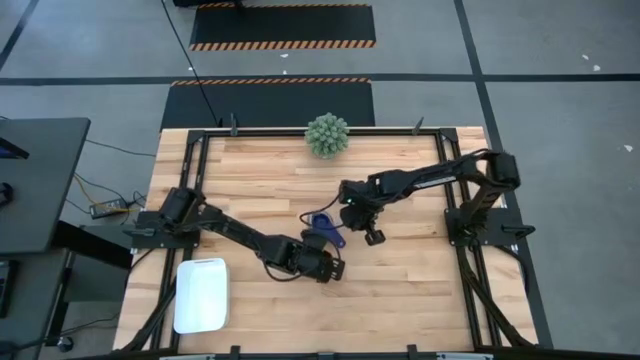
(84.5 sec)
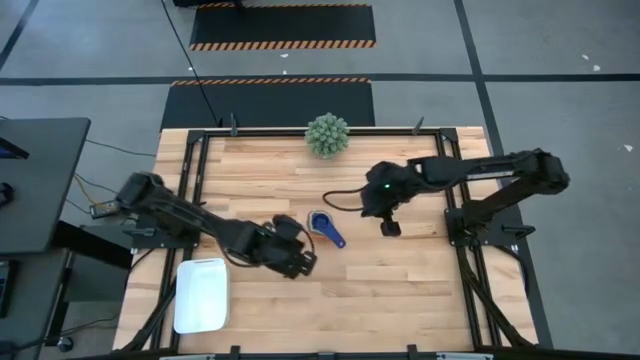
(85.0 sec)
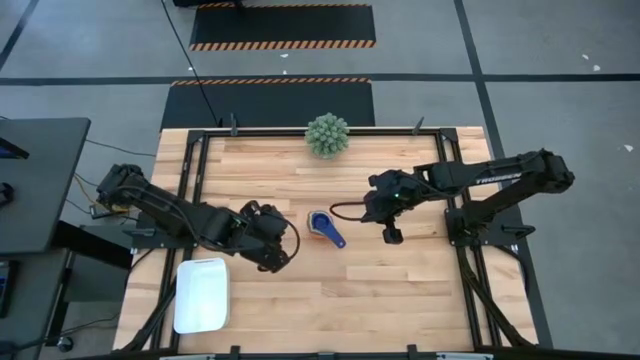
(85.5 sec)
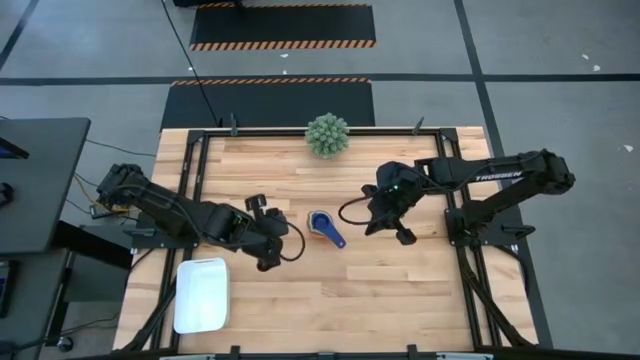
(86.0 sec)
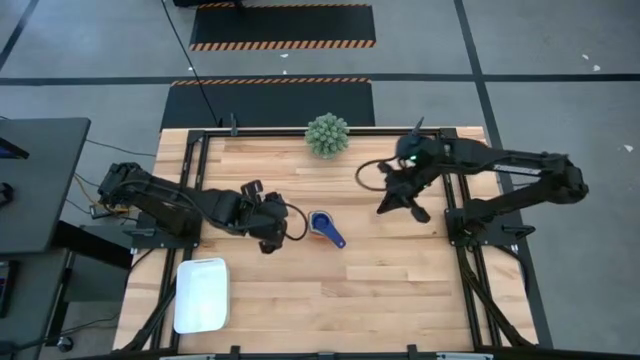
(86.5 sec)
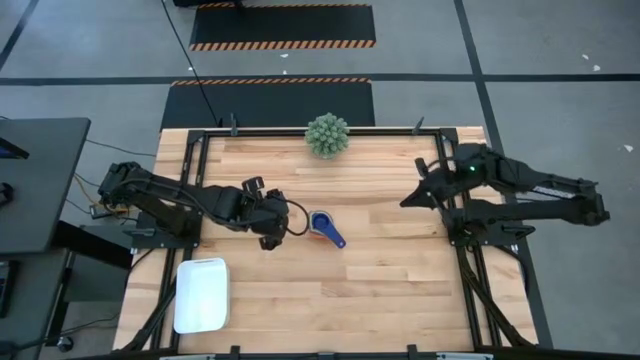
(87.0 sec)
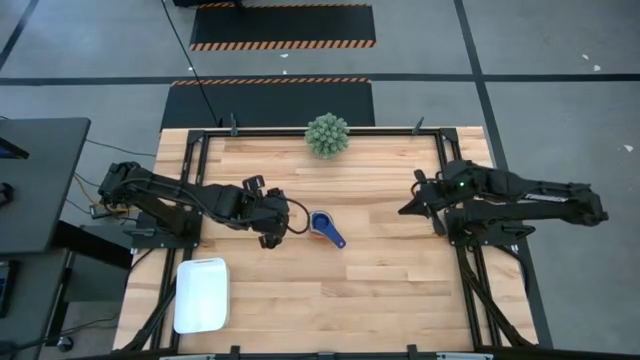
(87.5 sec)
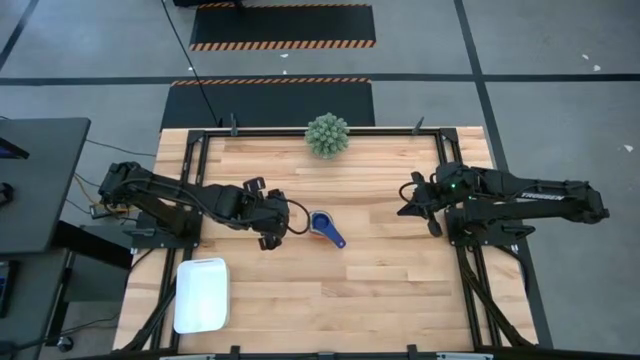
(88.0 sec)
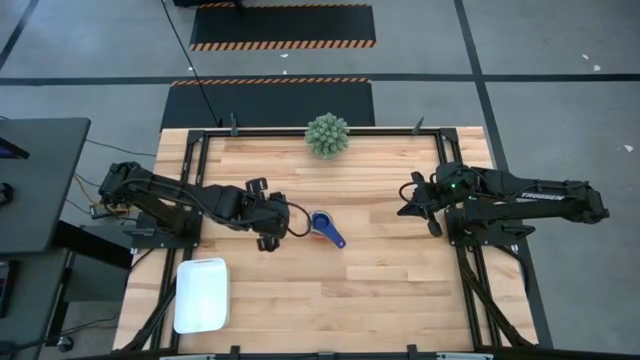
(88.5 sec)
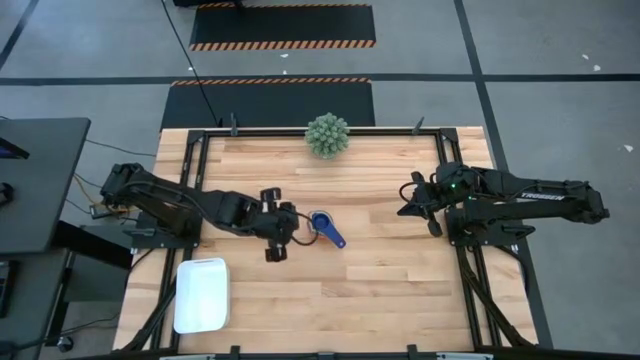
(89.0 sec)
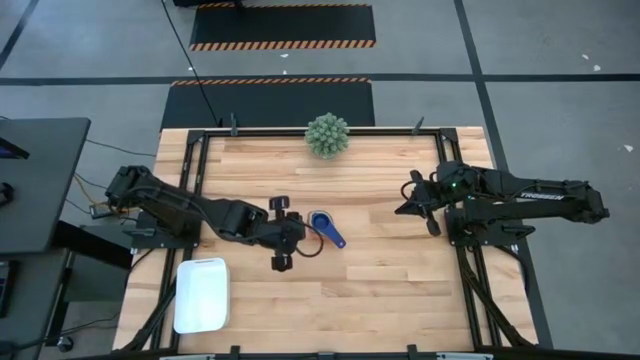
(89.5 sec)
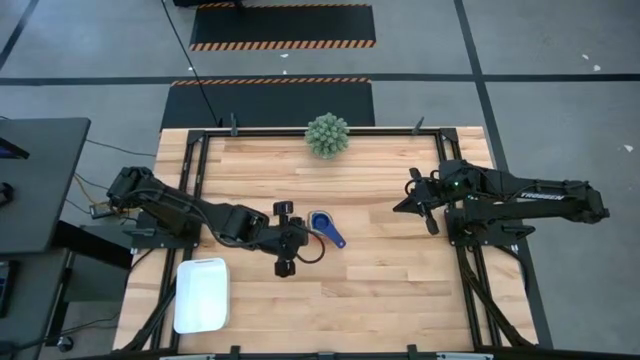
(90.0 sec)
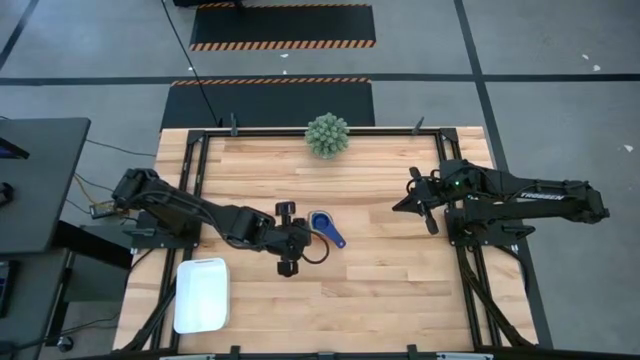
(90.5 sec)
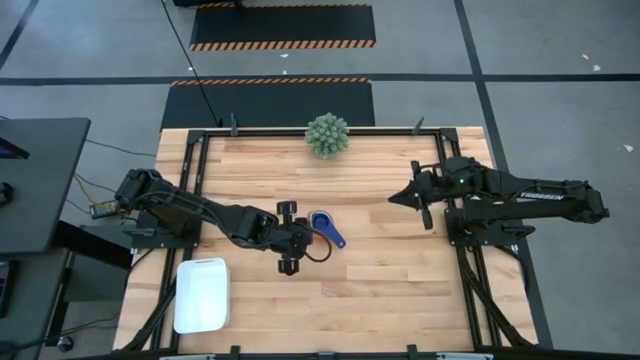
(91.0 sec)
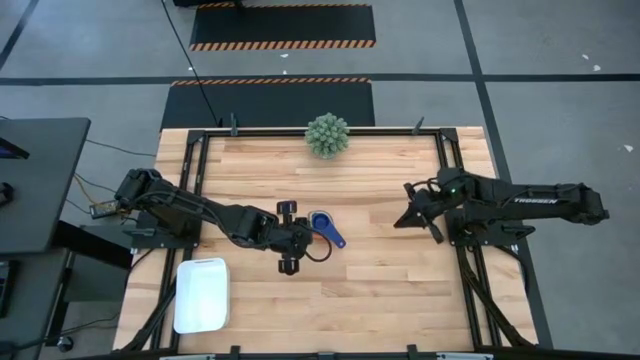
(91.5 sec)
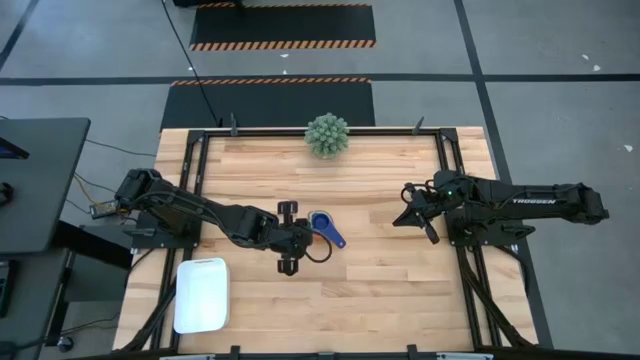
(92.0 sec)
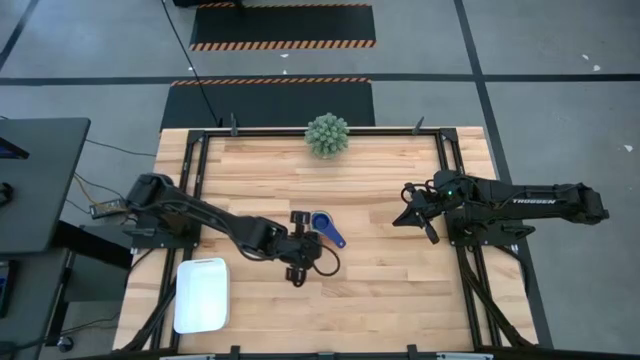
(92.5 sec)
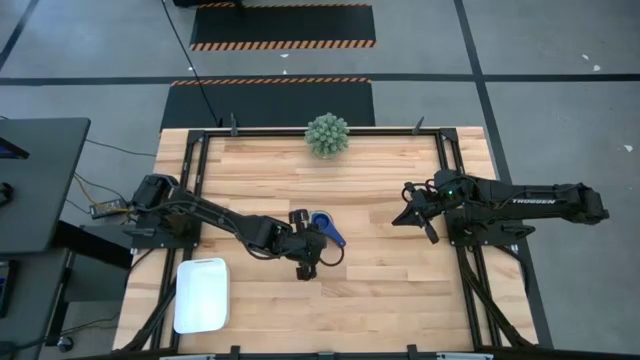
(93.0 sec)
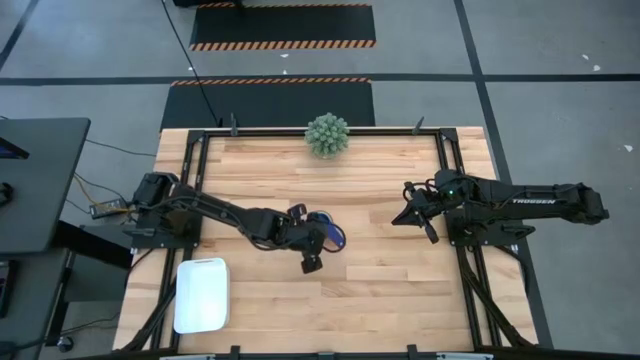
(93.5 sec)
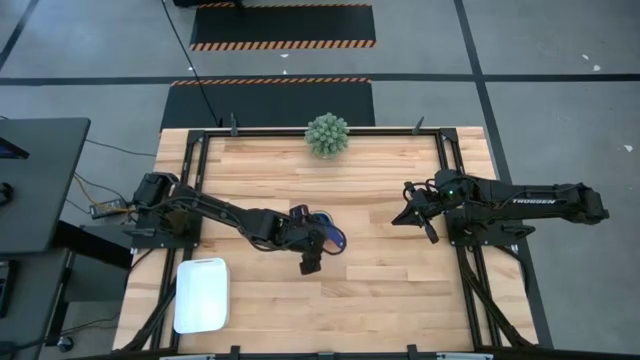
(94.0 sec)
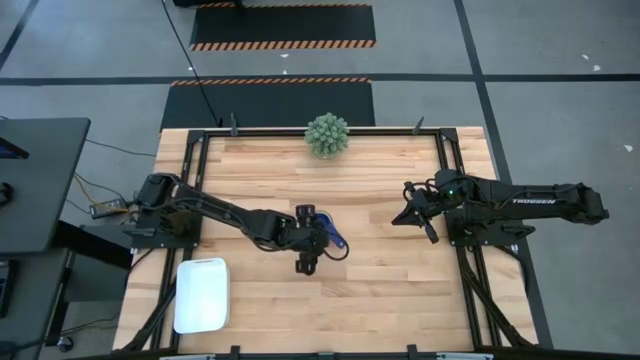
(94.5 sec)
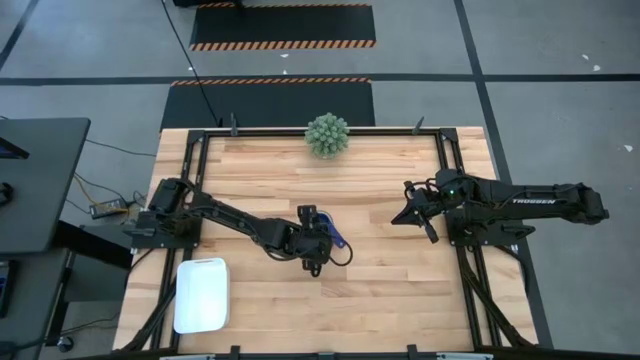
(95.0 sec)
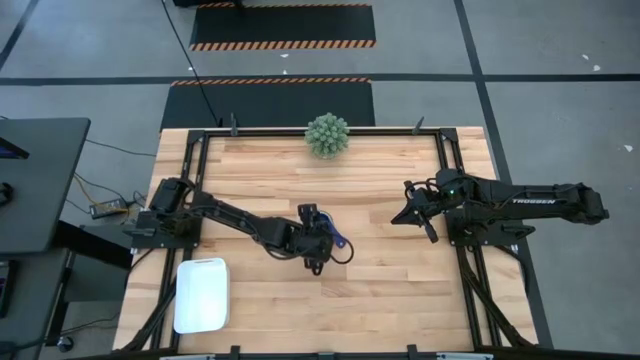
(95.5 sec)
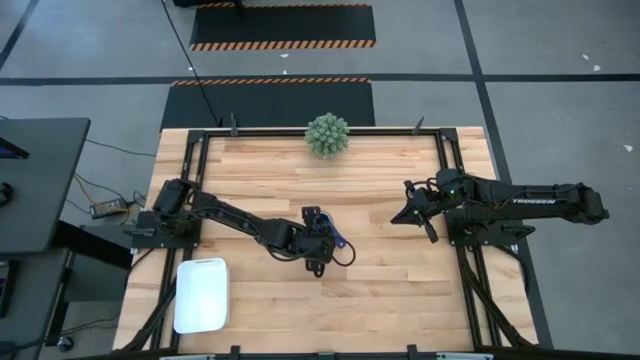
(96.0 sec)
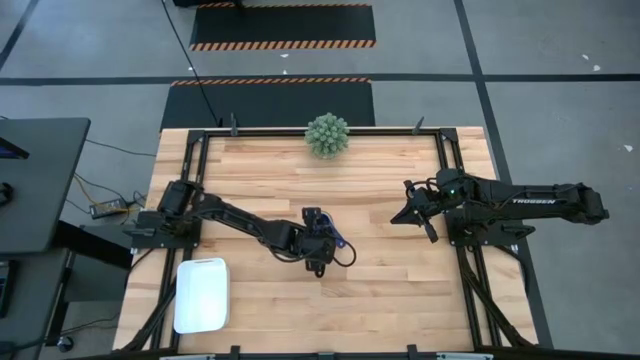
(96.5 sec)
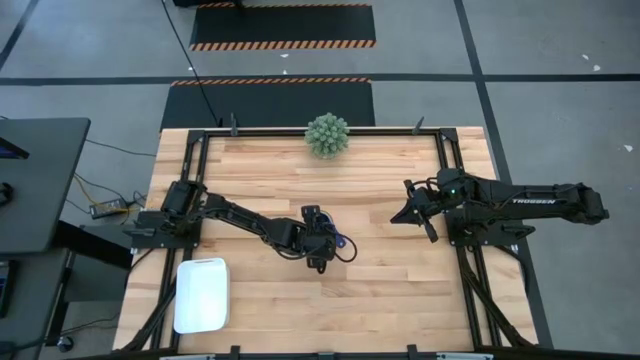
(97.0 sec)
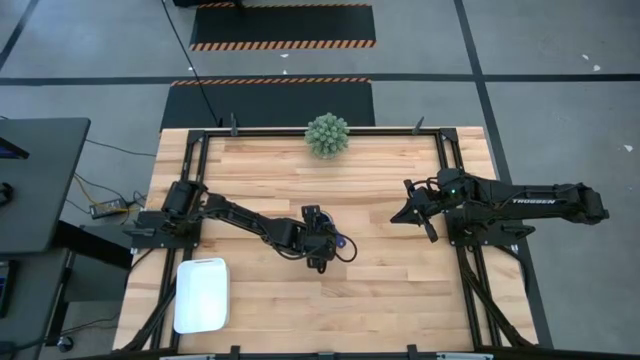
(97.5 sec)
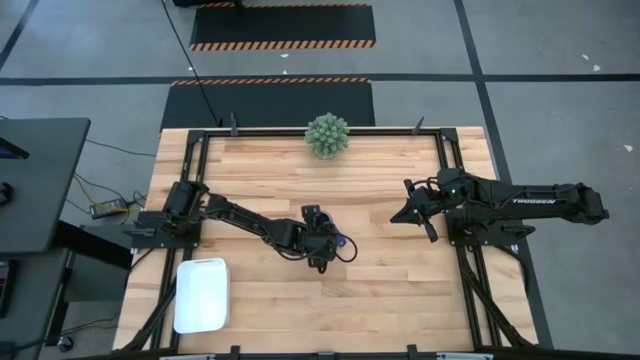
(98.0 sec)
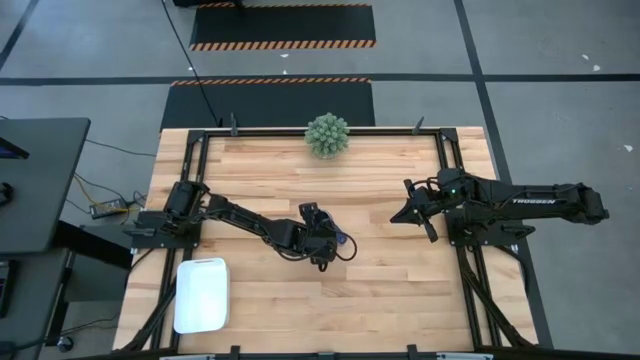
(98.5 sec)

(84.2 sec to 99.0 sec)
Task: Nest measuring cups in basket
Put the nested measuring cups into the white bin

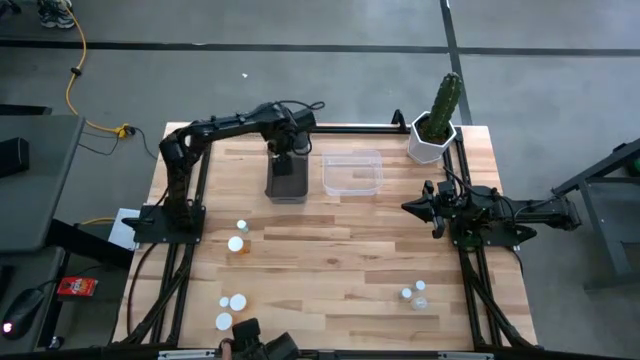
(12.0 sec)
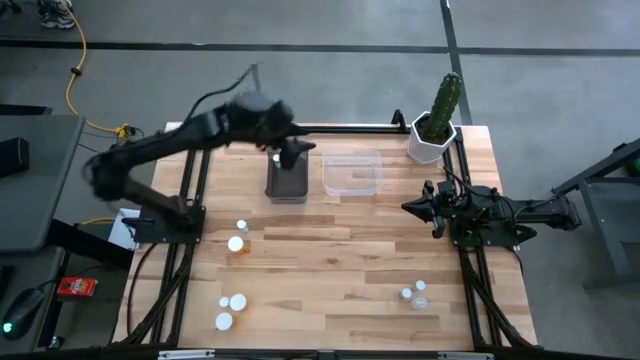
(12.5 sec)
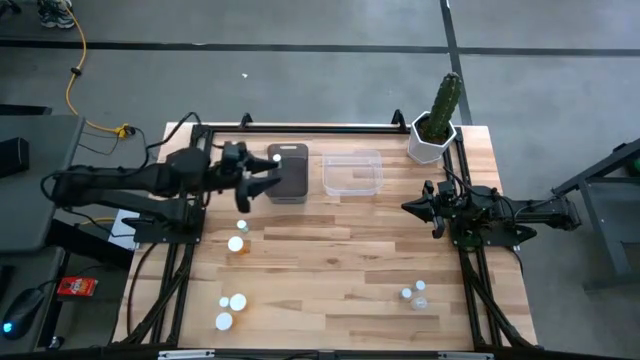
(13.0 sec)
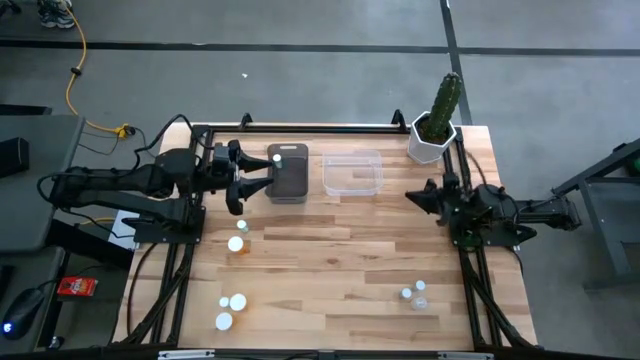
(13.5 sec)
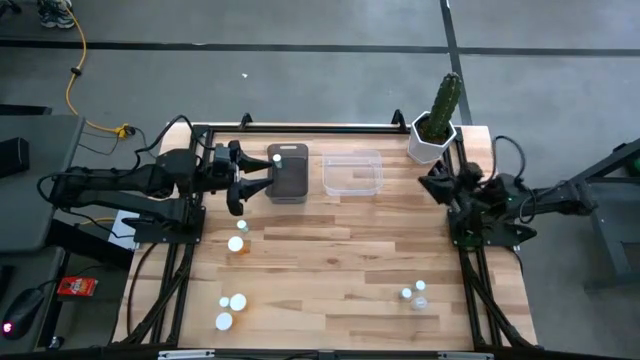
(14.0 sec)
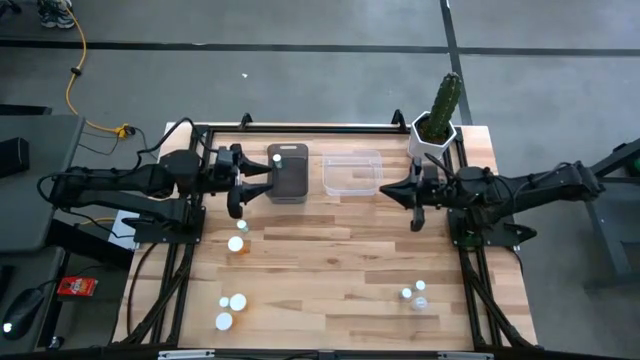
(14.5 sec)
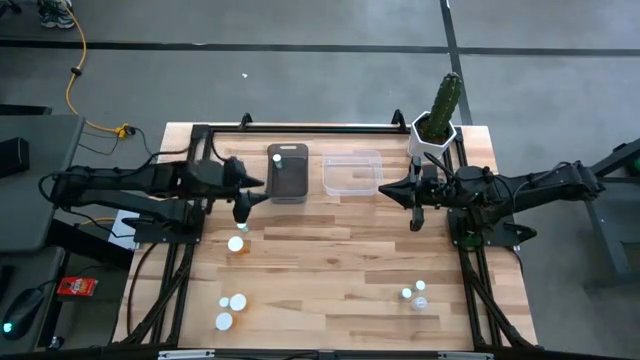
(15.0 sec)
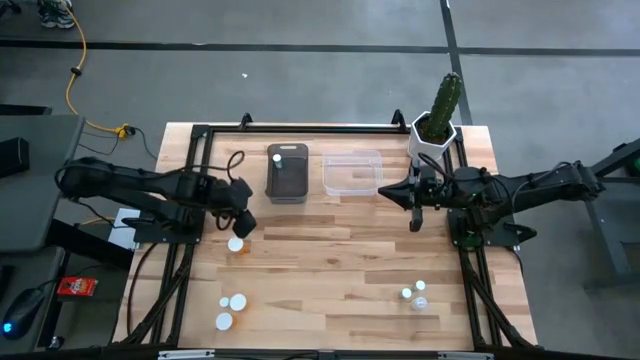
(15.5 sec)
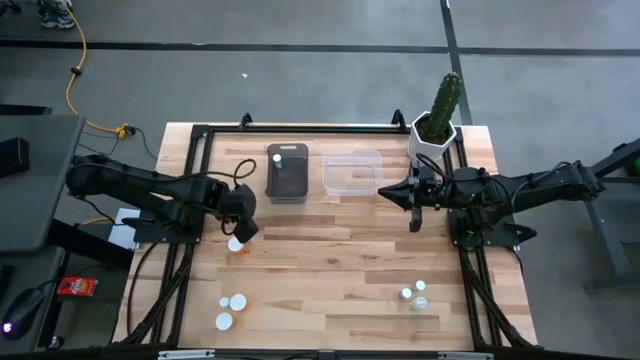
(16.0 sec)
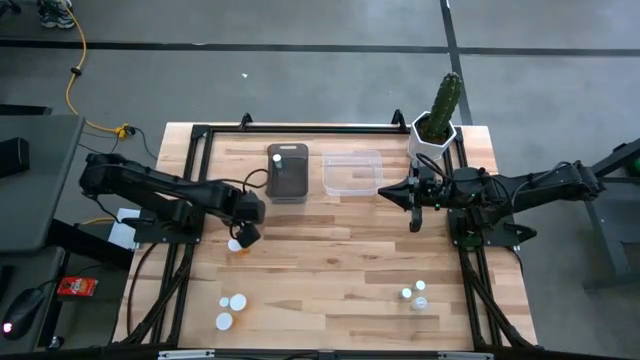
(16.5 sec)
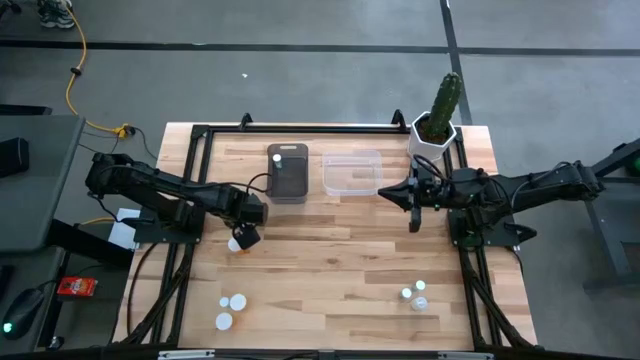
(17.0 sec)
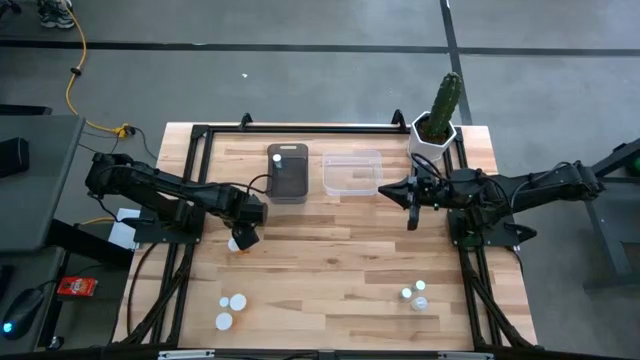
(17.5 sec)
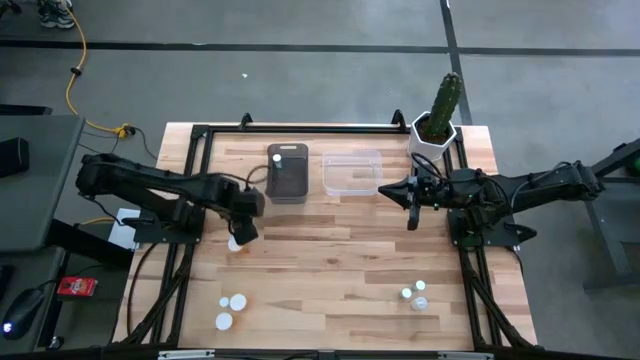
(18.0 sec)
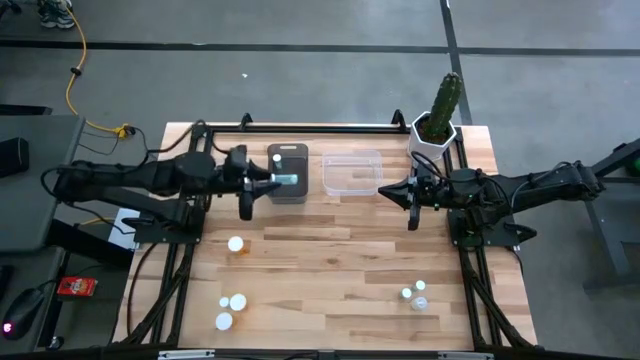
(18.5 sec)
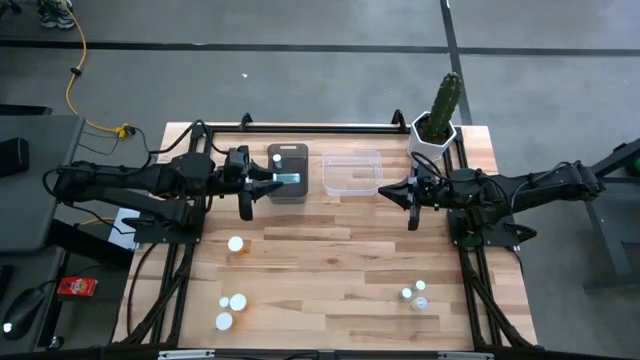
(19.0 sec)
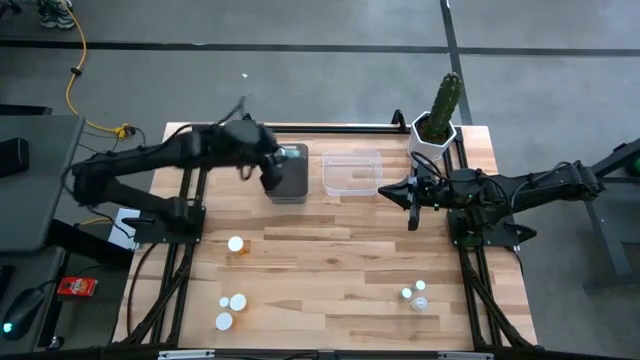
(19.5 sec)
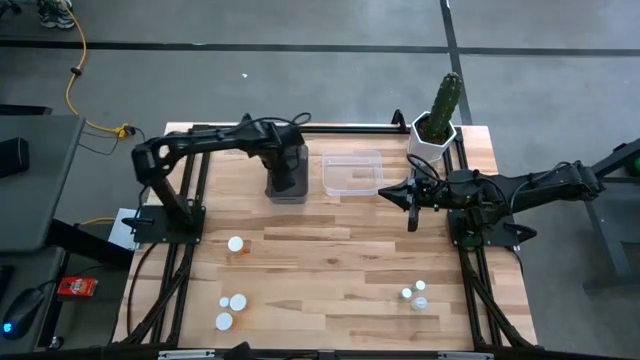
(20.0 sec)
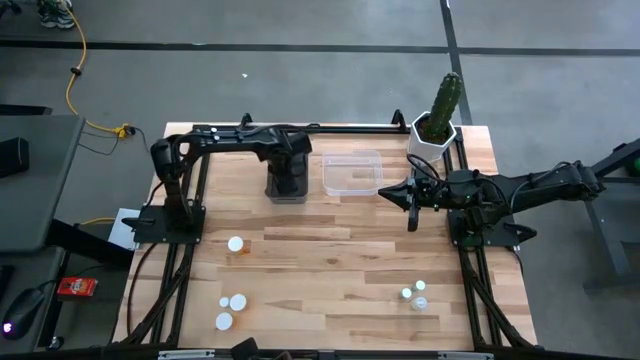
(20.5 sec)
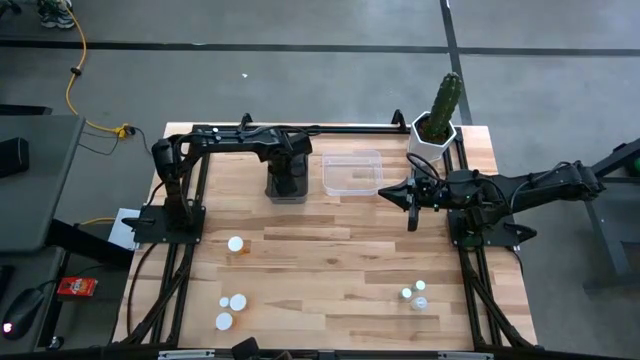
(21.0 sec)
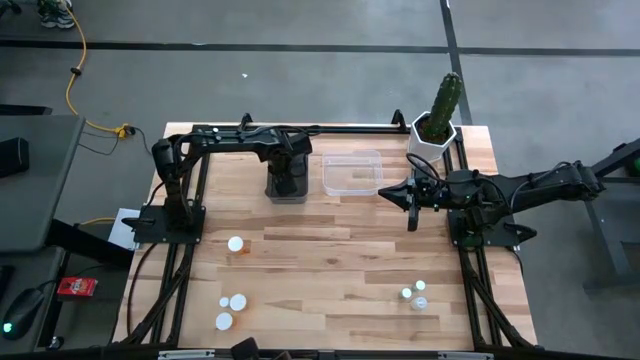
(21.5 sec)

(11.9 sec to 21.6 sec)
Task: Pick and place medicine bottles into bin by pill shape (circle, oval)
Put the blue tablet bottle into the black bin
